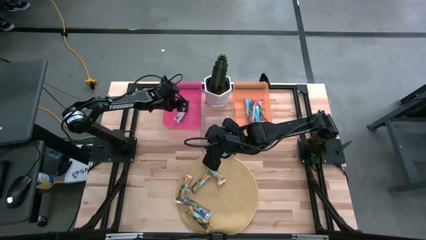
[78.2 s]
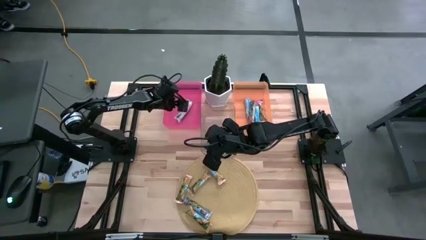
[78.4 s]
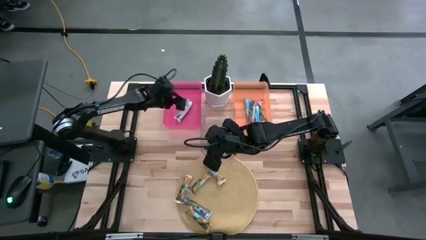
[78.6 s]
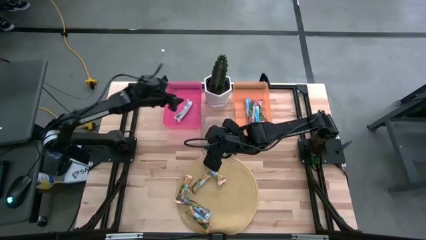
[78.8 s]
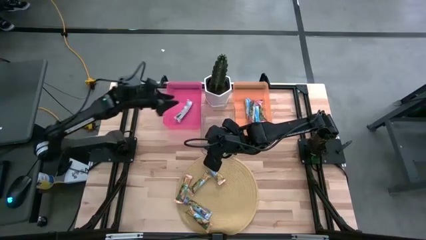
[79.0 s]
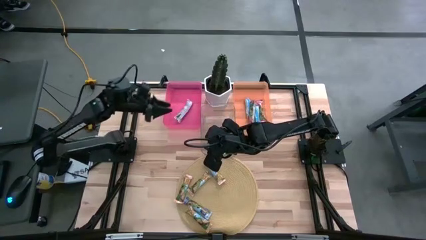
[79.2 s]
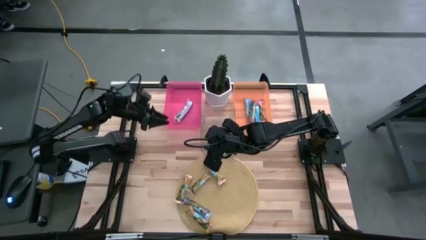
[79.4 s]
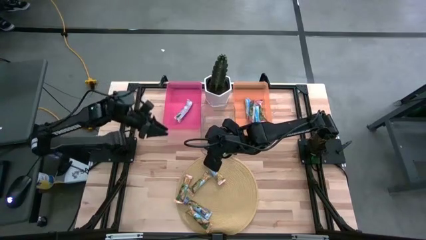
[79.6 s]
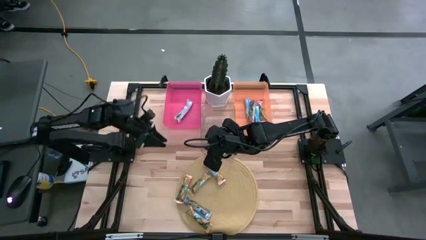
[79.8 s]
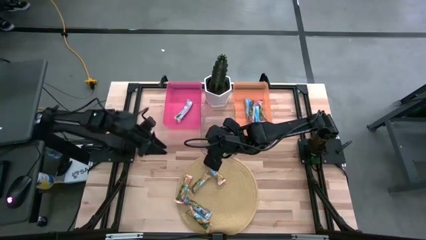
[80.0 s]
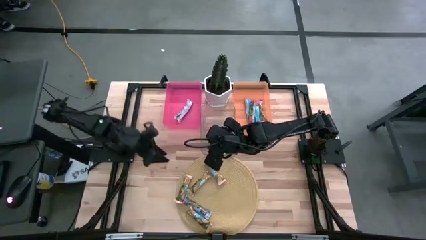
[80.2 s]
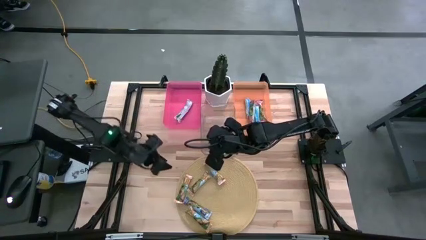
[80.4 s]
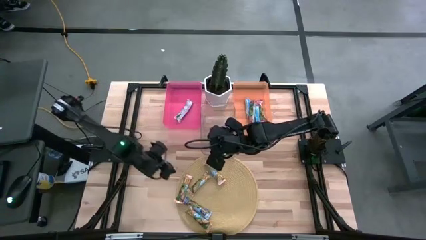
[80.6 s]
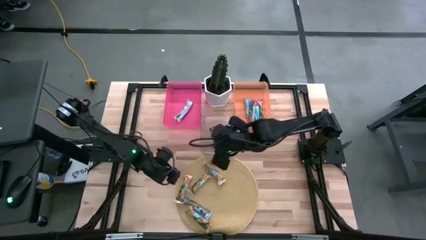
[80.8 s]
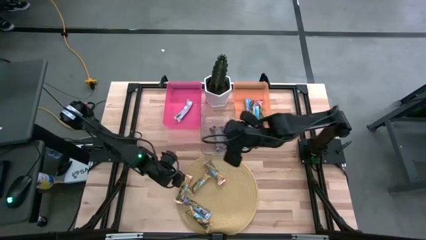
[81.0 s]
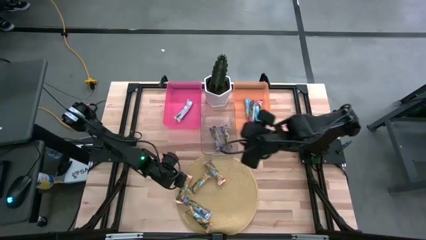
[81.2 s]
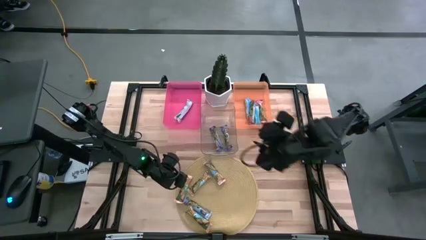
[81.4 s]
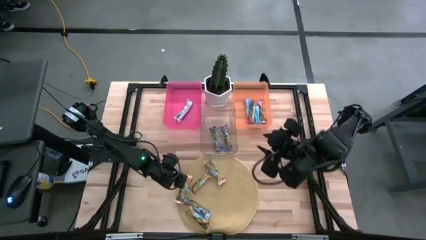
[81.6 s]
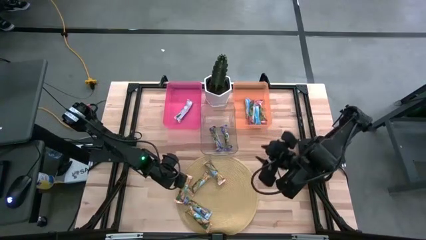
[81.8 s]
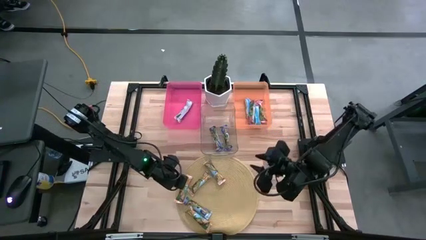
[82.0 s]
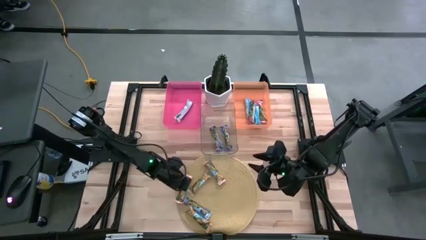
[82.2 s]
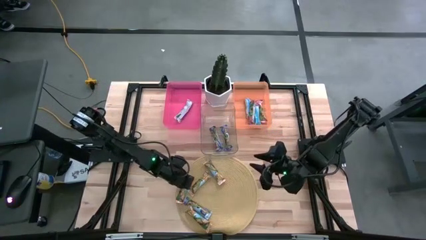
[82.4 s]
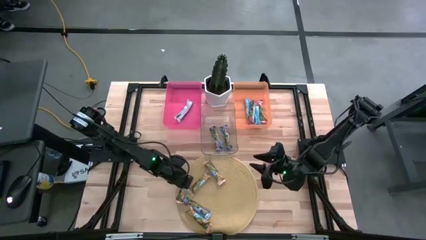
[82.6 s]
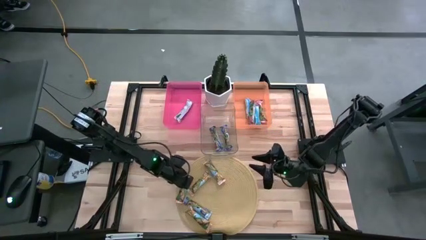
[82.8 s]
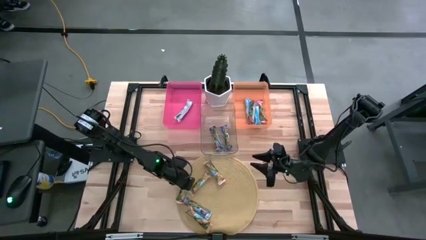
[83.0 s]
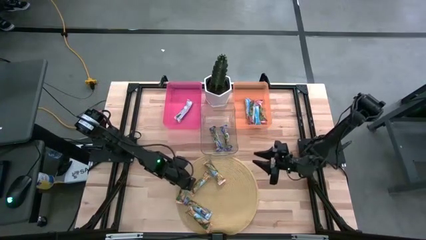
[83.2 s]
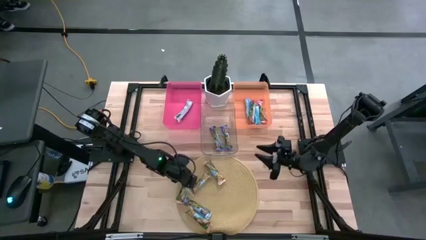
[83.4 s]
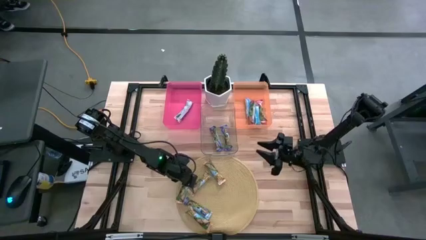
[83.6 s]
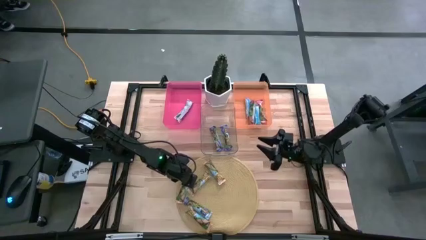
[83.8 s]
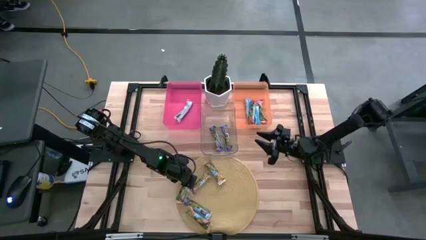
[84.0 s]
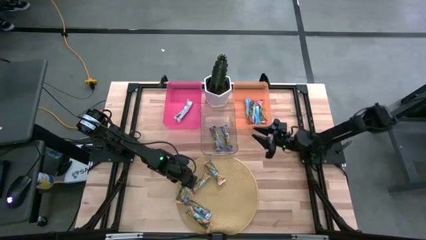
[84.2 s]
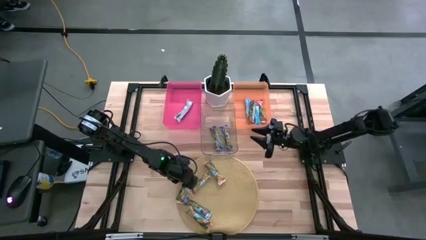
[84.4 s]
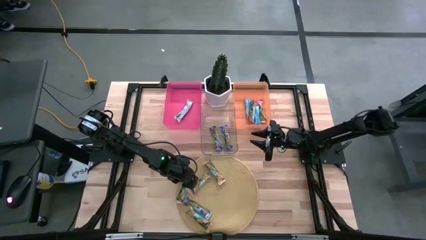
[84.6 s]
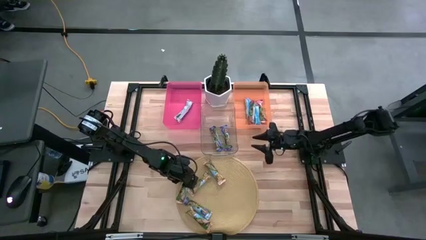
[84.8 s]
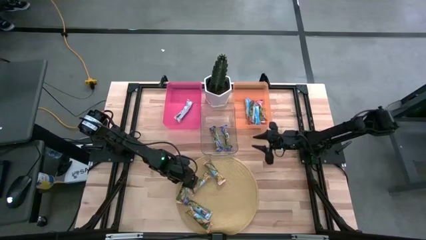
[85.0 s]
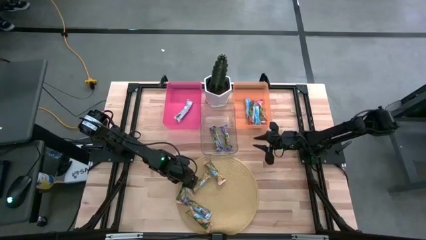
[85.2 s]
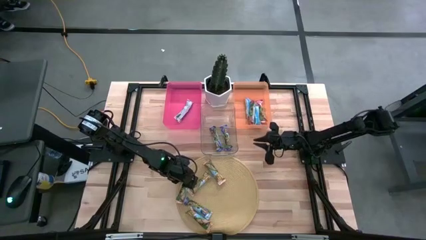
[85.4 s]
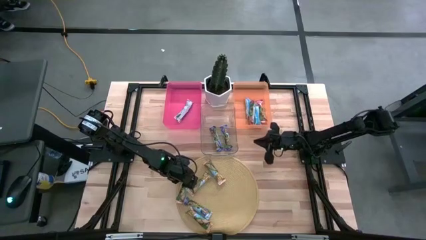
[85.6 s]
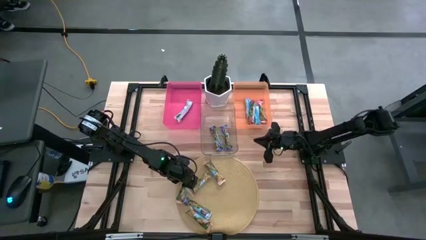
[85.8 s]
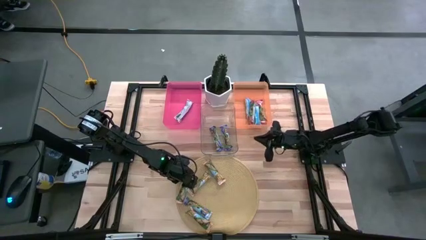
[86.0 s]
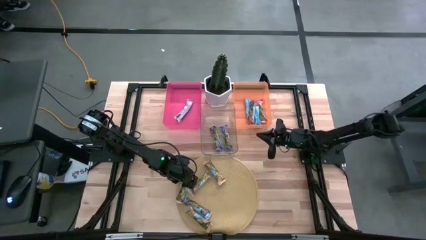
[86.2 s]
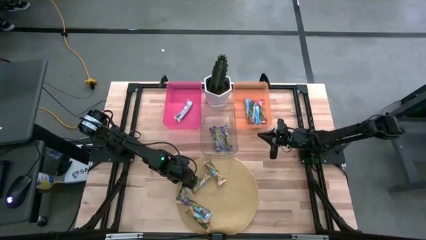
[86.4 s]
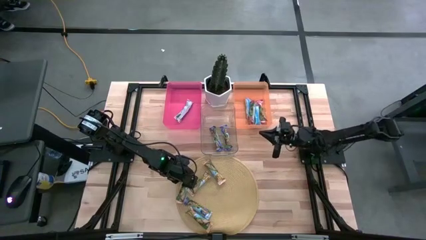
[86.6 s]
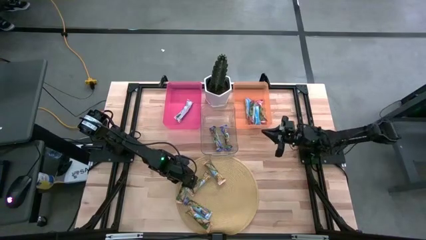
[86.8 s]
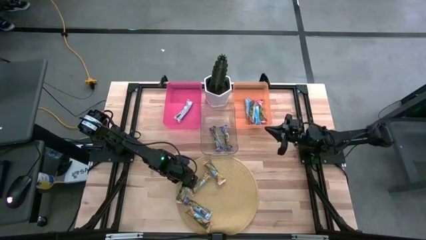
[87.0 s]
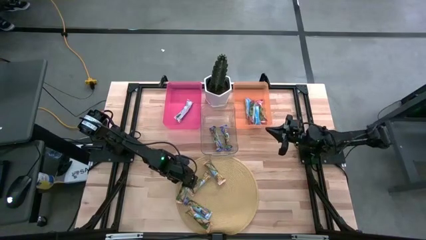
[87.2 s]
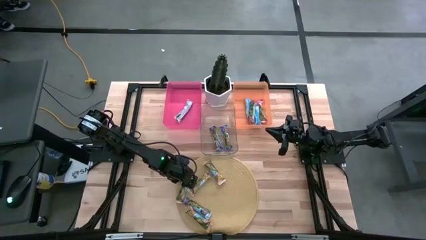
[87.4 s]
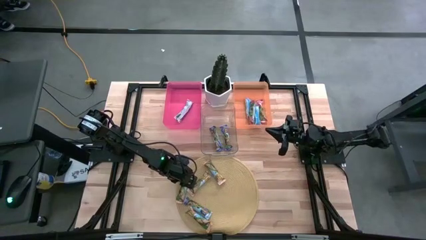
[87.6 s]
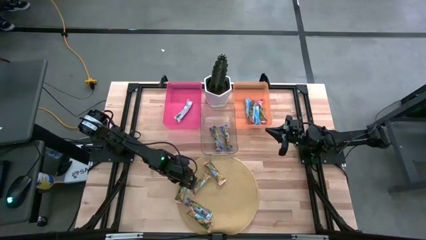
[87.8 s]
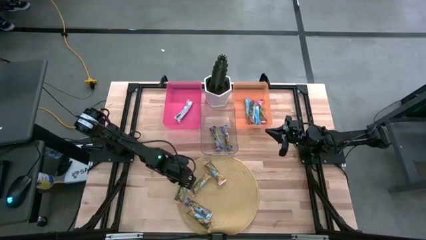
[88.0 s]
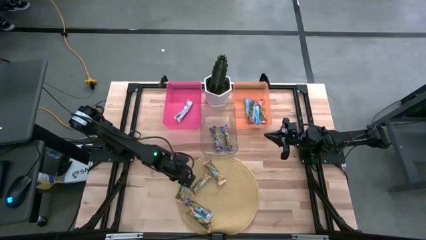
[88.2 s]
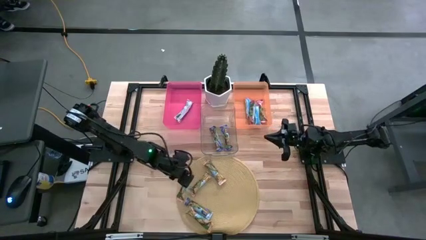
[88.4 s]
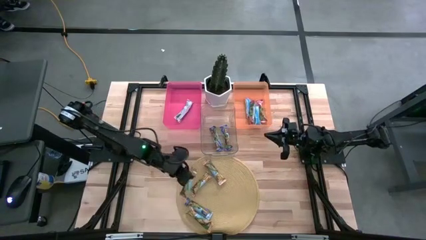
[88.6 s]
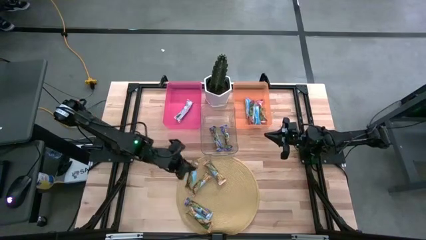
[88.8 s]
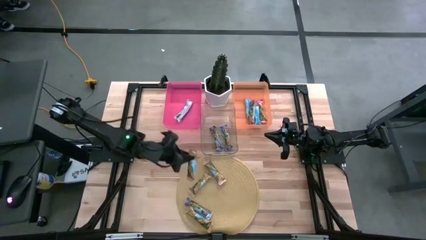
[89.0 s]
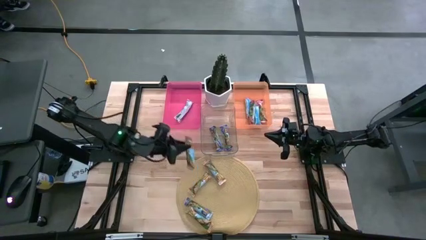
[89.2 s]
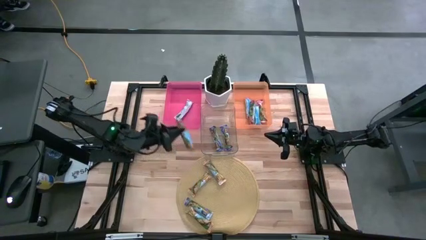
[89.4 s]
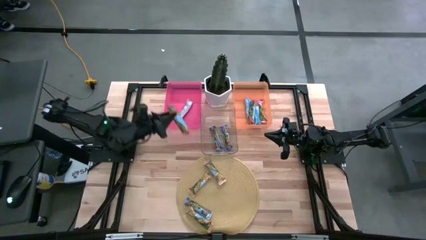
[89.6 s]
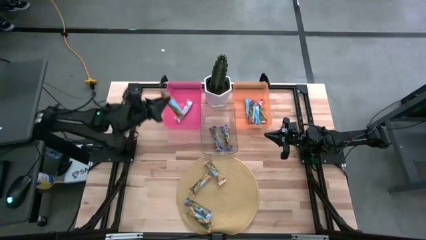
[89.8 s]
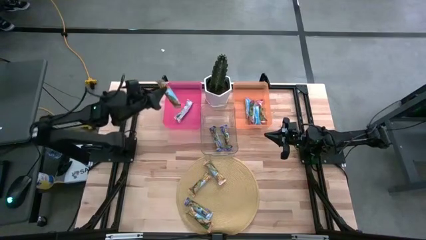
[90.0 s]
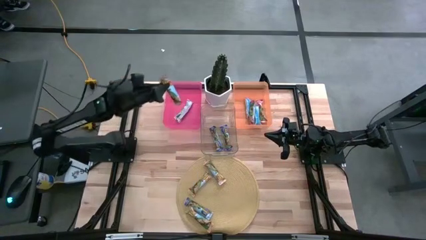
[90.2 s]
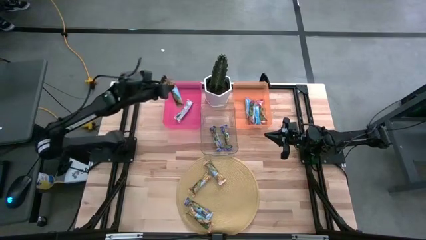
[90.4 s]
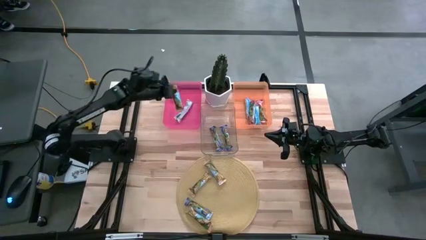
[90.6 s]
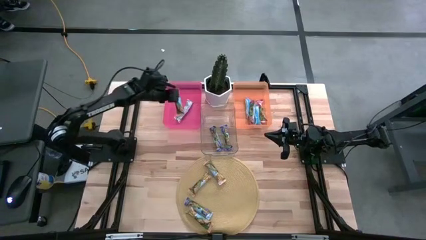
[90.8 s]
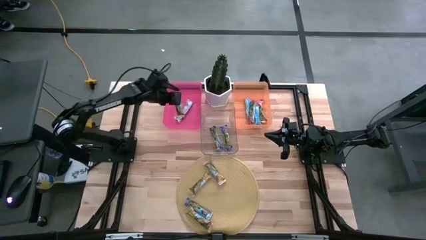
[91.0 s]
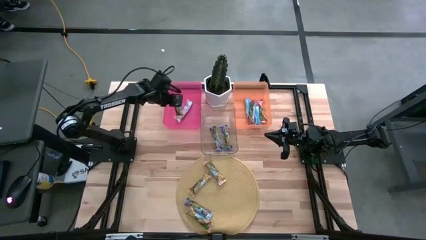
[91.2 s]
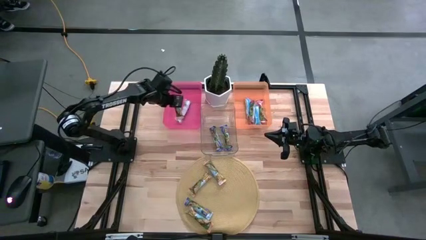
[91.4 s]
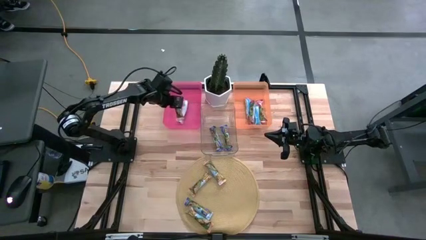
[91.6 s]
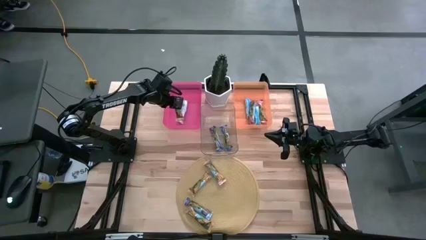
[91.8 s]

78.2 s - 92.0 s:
Task: Pick and place Granola Bars by type
Put the yellow granola bar into the pink bin

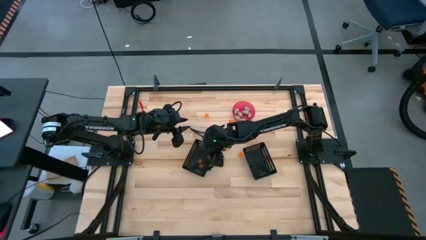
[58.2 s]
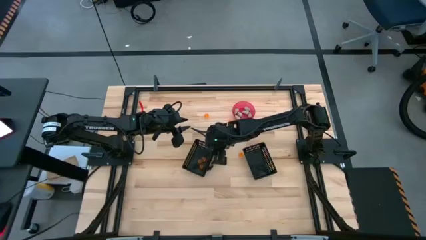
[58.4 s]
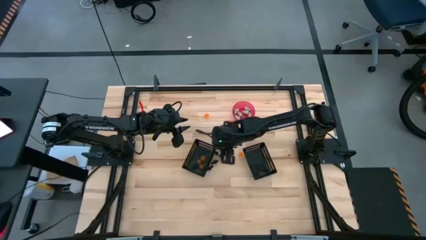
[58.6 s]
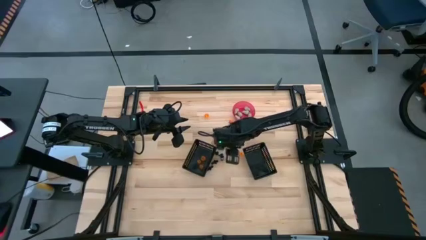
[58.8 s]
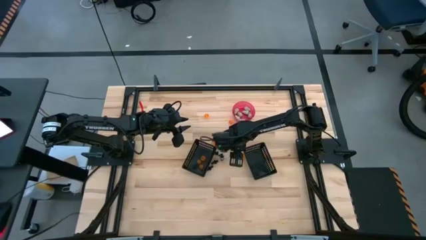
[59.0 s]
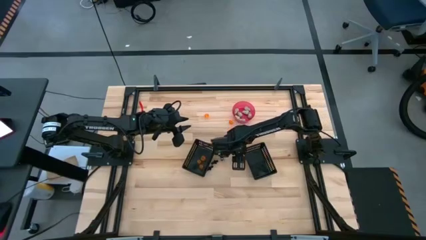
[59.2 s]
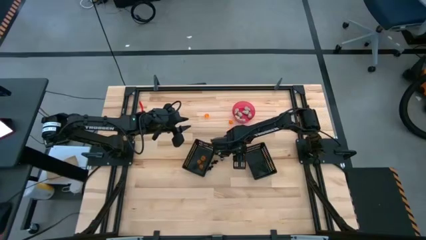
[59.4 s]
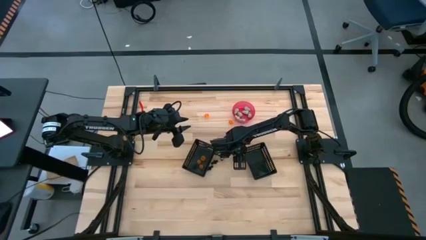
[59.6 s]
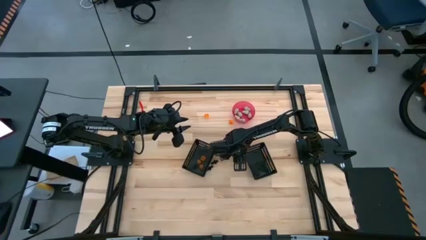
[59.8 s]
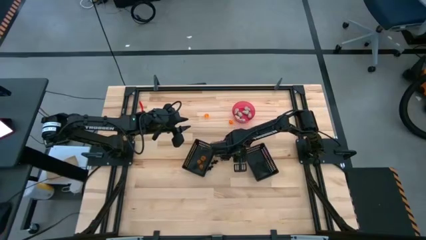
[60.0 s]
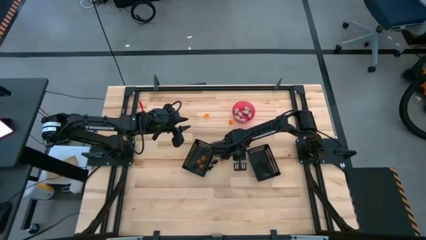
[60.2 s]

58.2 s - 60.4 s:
Task: Sort Halloween decoration
Put the orange pumpkin toy into the left black bin

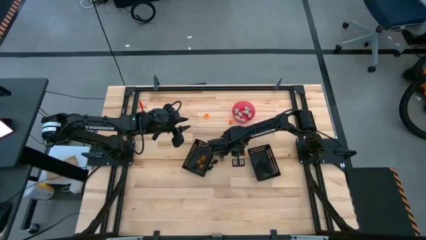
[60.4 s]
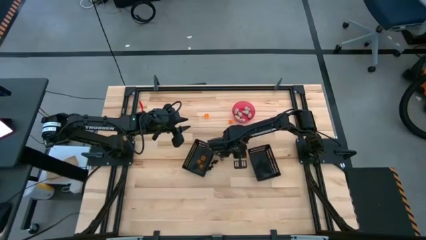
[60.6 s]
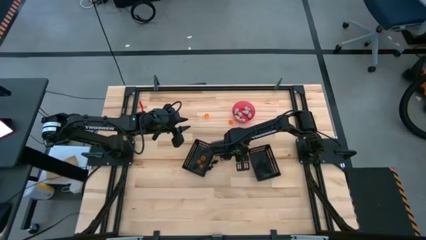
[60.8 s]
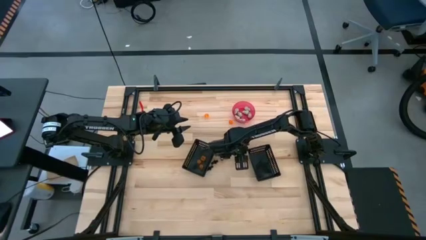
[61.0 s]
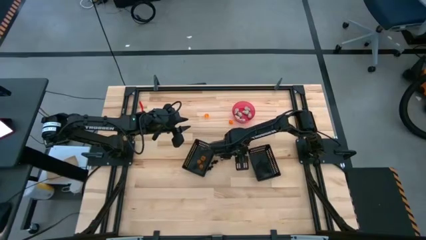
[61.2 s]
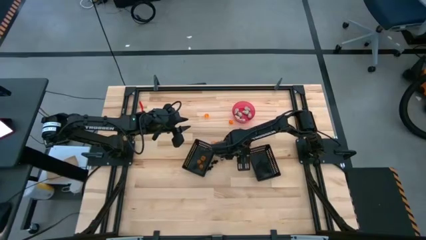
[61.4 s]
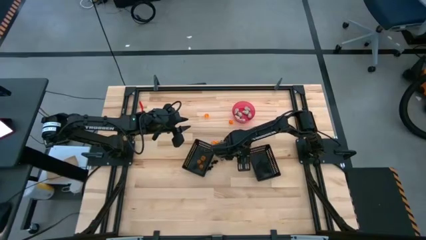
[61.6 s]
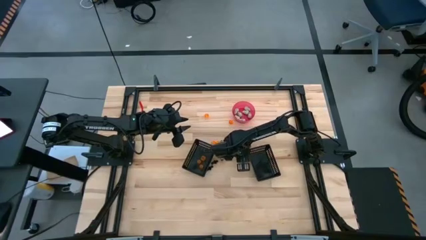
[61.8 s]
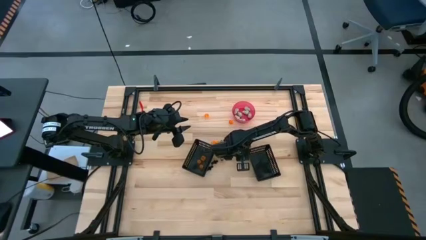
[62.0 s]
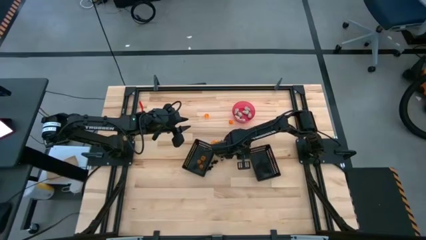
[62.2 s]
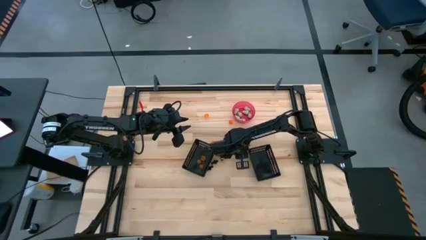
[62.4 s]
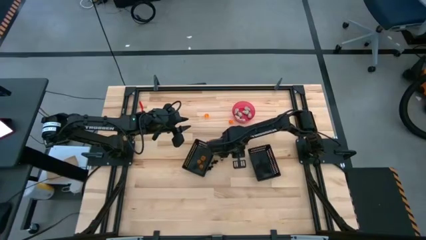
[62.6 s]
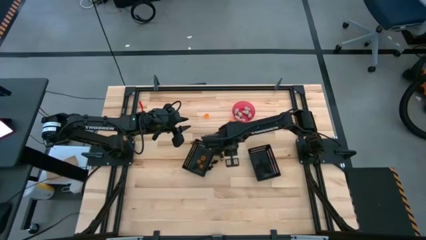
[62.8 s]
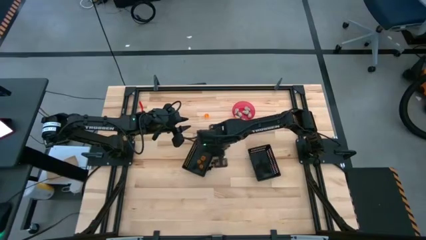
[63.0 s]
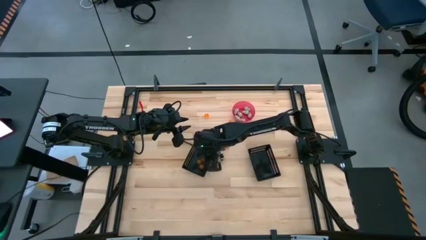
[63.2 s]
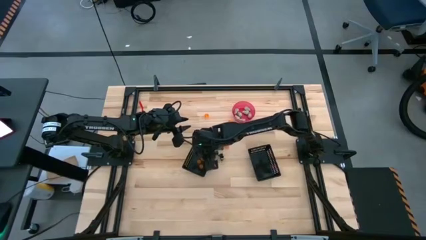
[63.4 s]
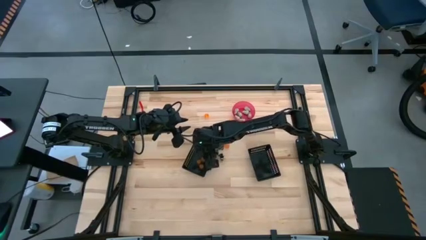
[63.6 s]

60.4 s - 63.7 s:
Put the orange pumpkin toy into the left black bin
